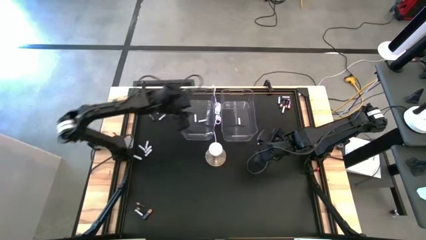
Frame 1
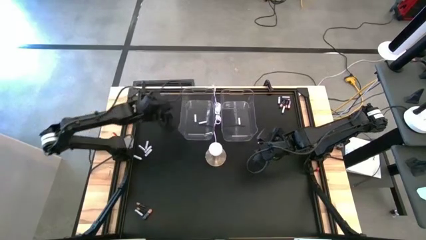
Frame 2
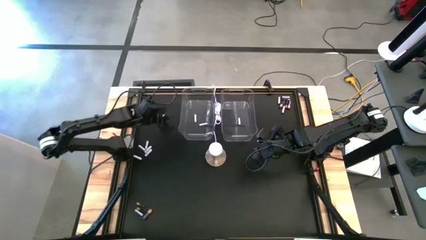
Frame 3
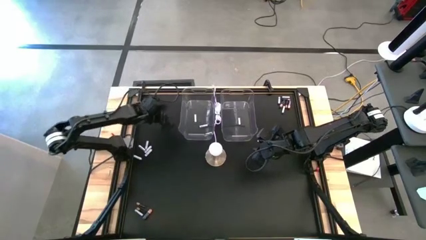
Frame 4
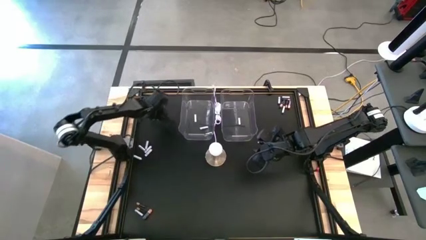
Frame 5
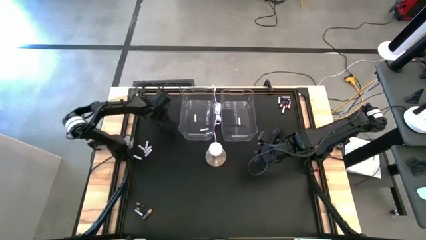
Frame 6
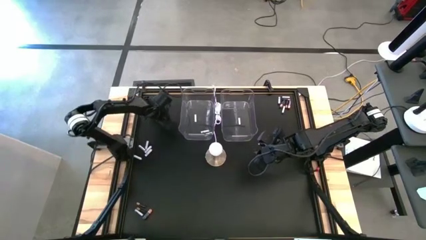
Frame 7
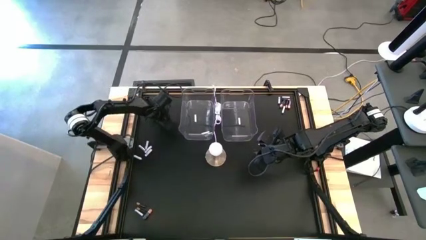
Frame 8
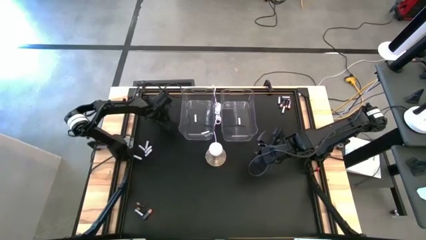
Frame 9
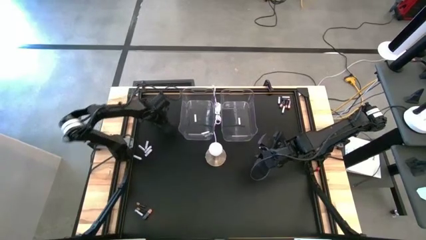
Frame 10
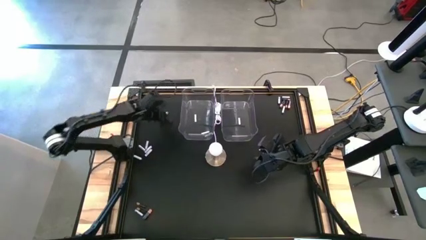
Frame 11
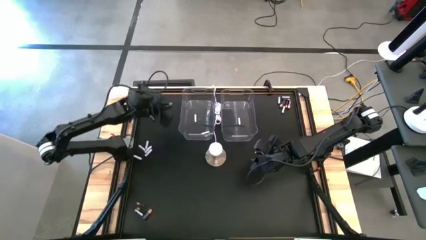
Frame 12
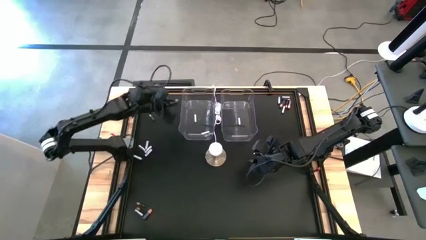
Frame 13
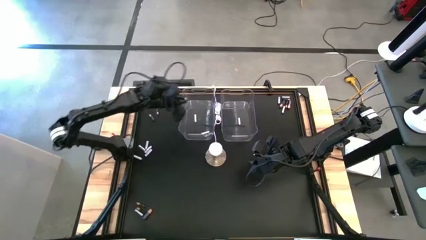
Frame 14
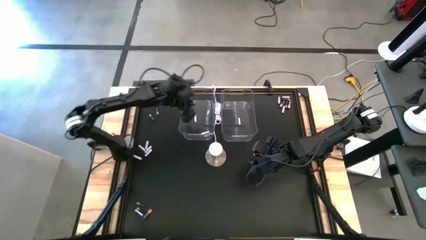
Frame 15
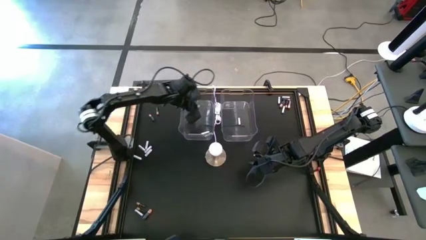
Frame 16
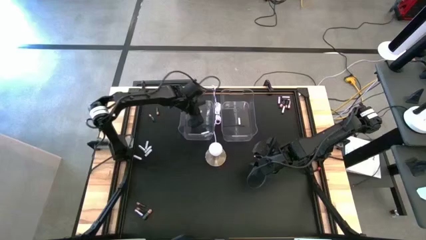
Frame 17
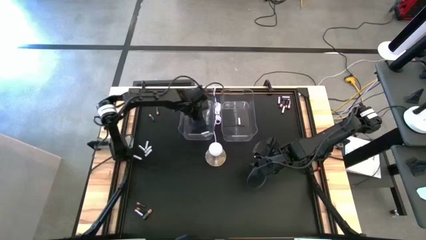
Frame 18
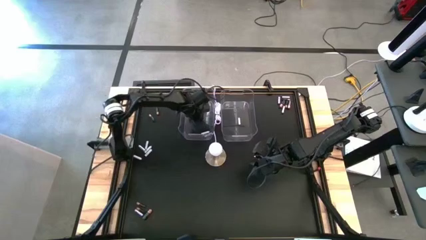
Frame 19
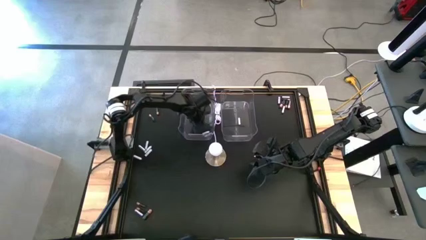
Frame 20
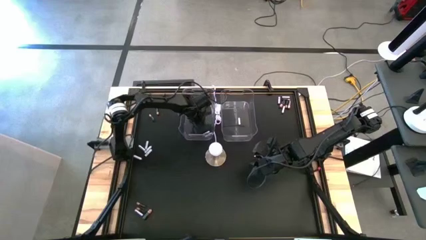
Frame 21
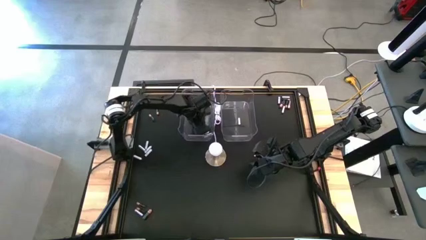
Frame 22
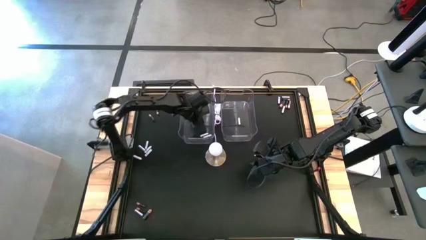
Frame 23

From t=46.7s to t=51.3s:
Task: Sort batteries
Put the white battery into the left transparent bin

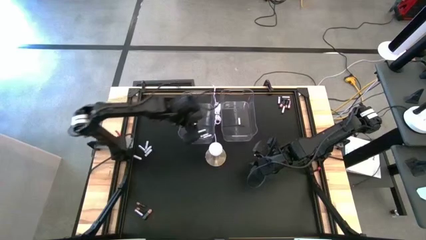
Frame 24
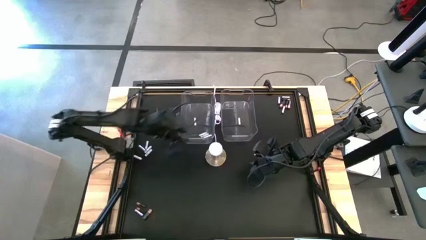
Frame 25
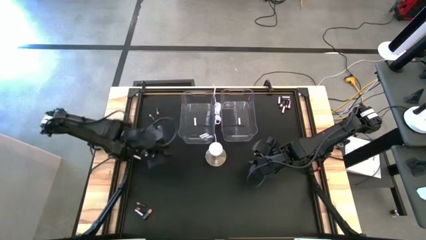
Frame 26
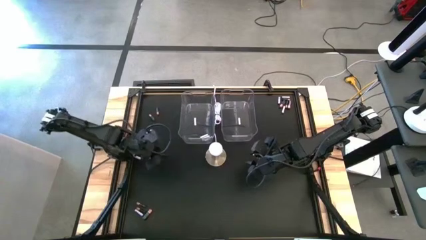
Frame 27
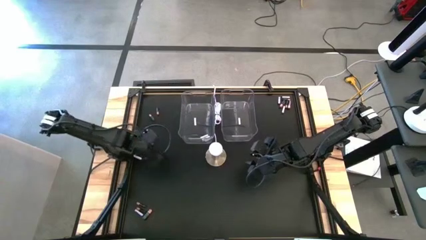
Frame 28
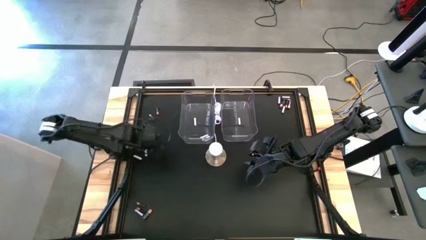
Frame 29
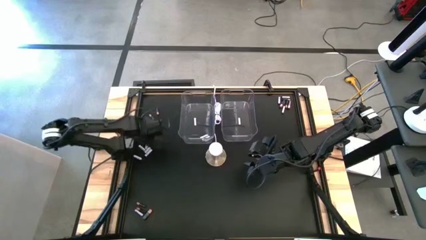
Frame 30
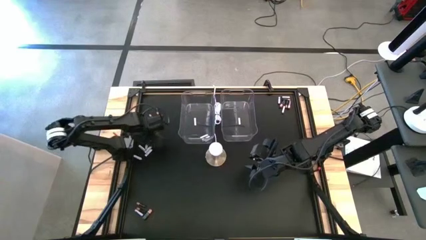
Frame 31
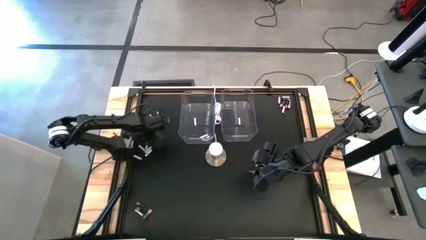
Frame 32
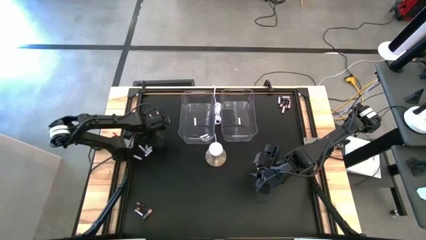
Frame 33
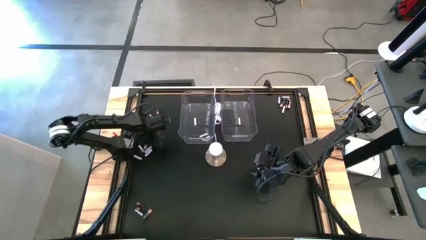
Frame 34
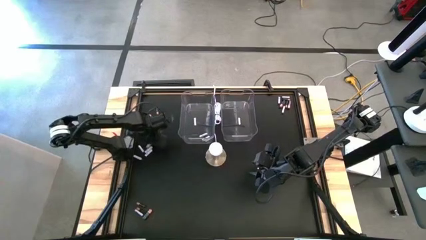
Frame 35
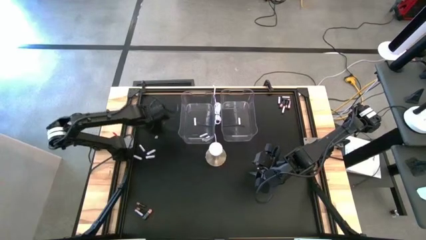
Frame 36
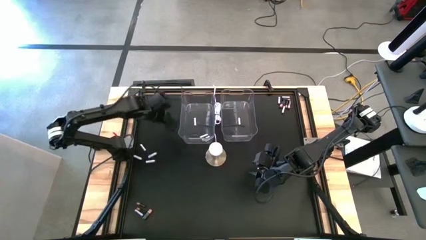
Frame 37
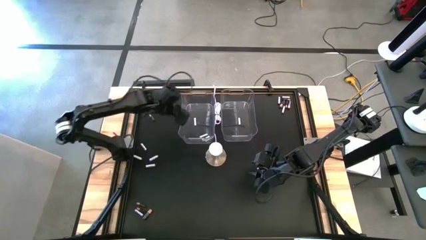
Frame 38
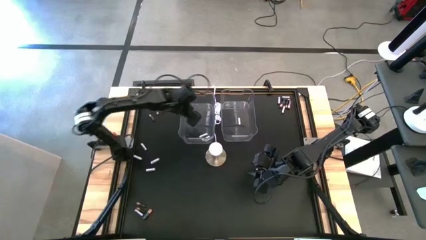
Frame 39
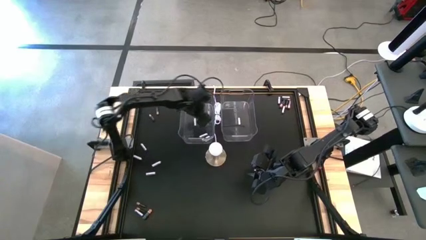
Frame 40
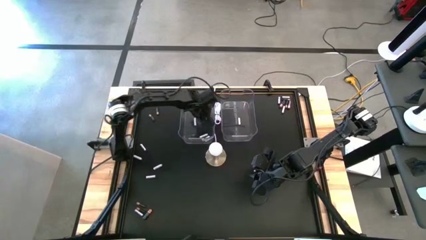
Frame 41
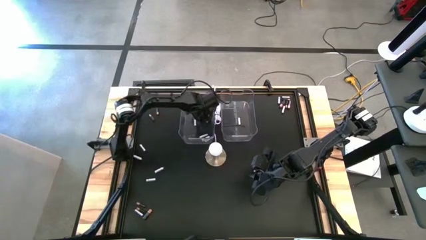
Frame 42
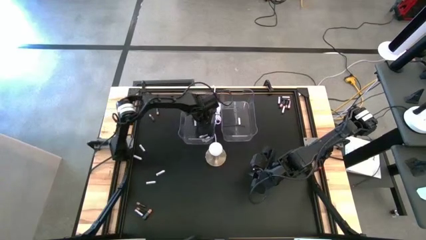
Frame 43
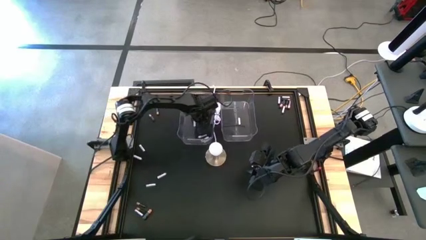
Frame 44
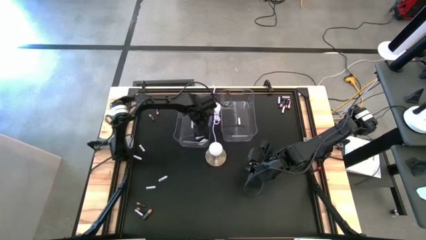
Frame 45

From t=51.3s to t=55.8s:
Put the white battery into the left transparent bin

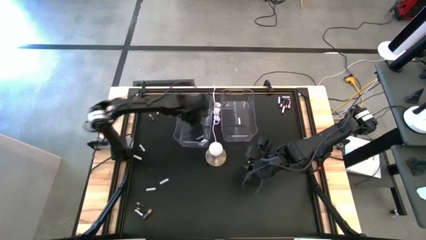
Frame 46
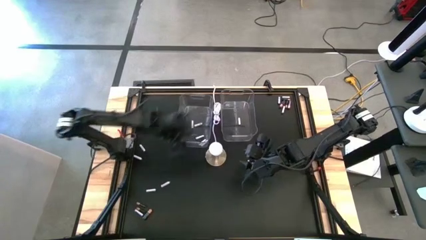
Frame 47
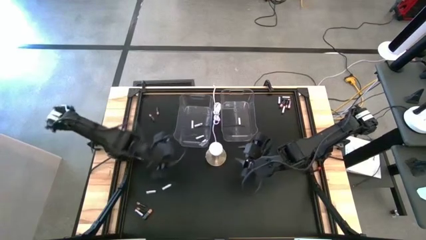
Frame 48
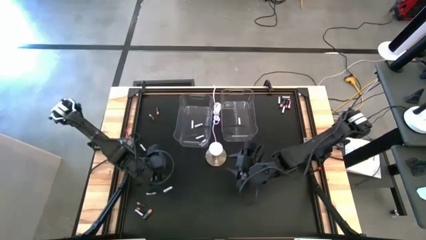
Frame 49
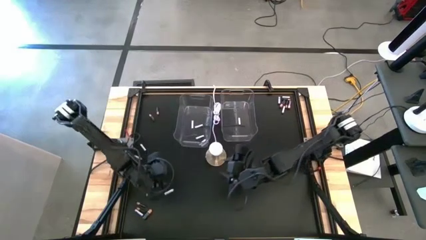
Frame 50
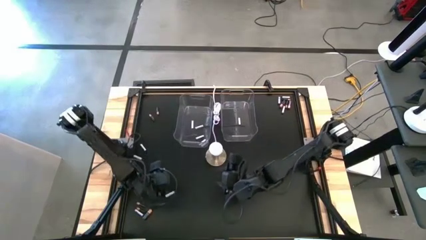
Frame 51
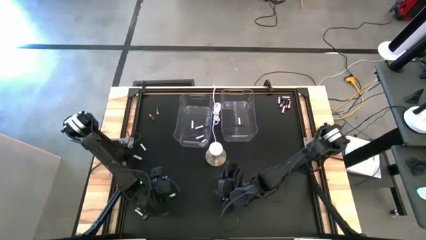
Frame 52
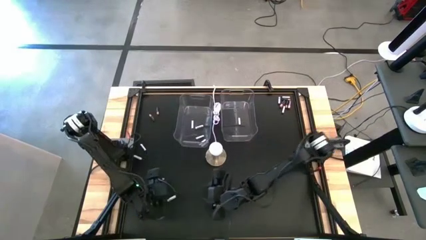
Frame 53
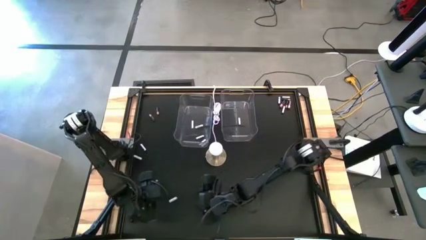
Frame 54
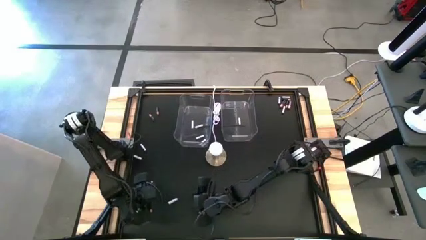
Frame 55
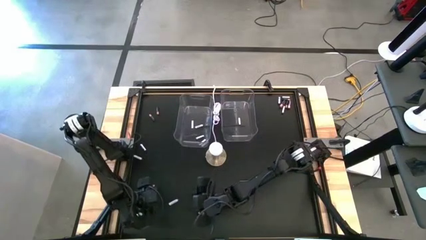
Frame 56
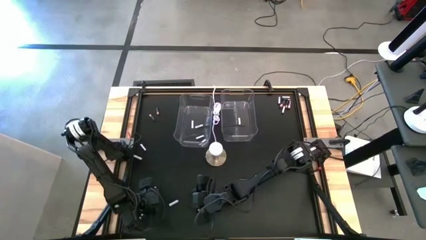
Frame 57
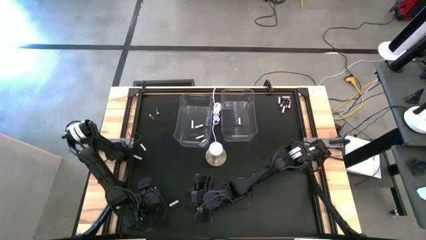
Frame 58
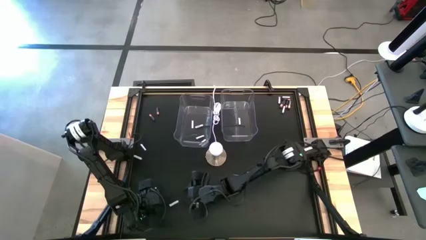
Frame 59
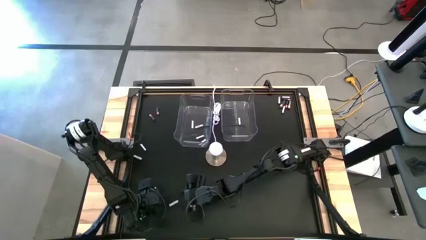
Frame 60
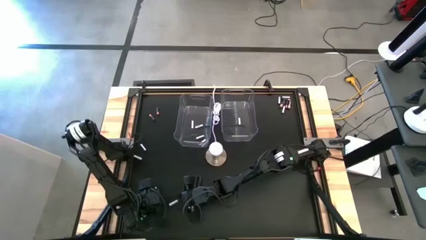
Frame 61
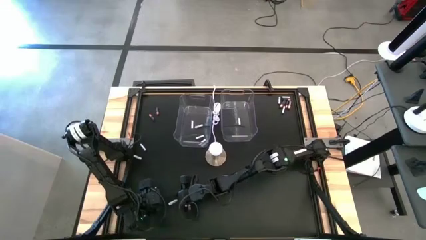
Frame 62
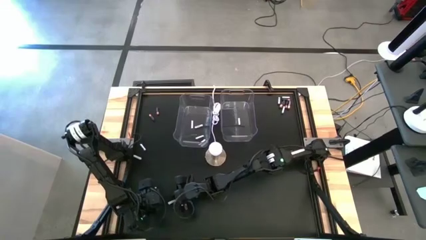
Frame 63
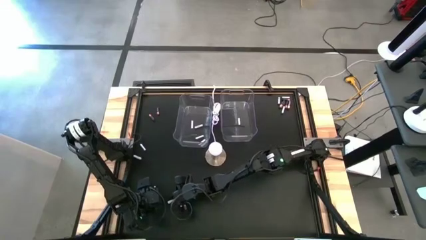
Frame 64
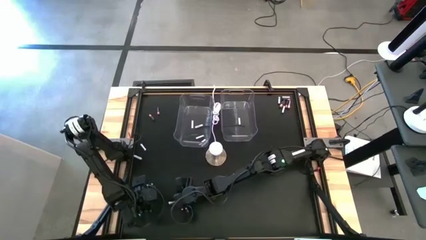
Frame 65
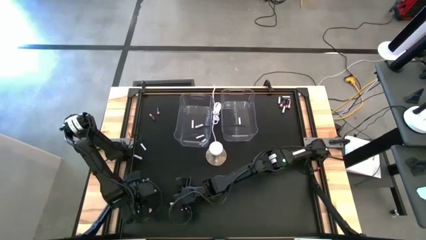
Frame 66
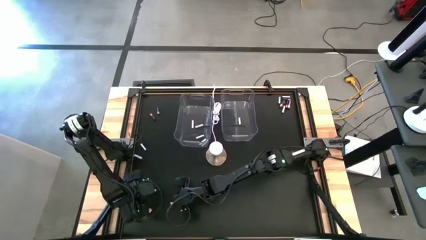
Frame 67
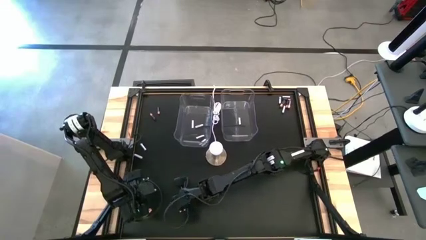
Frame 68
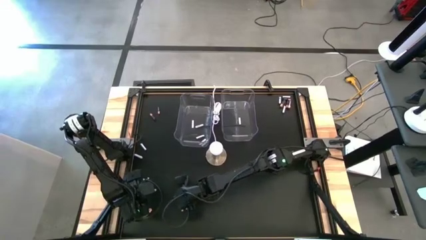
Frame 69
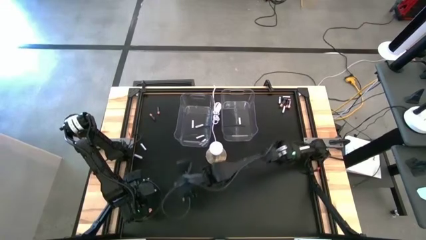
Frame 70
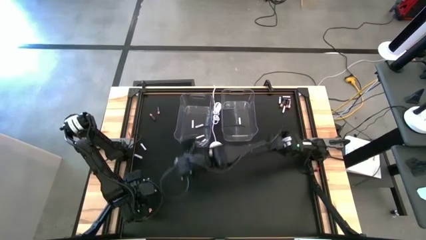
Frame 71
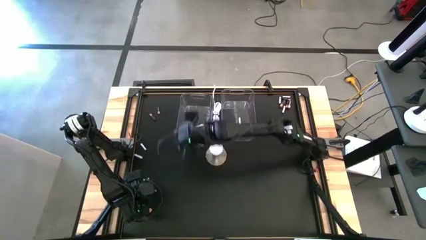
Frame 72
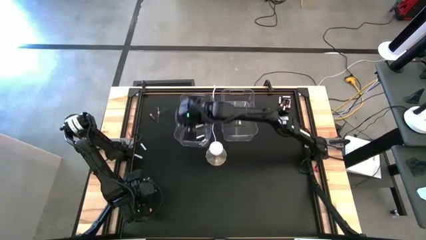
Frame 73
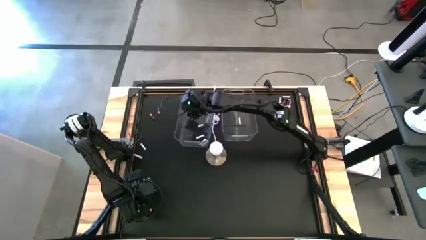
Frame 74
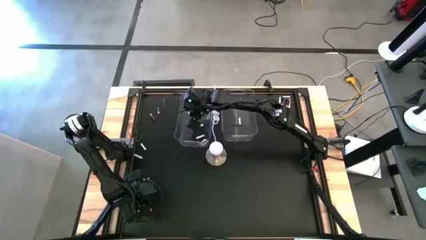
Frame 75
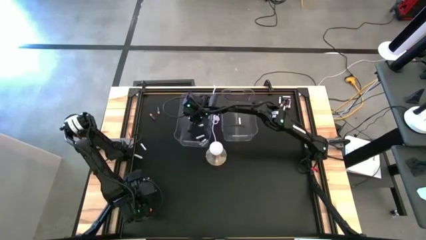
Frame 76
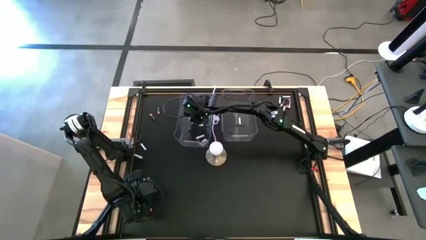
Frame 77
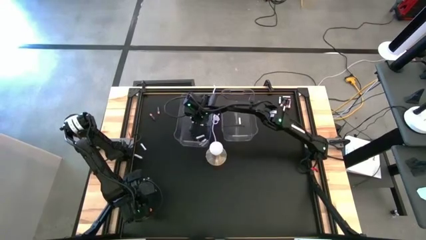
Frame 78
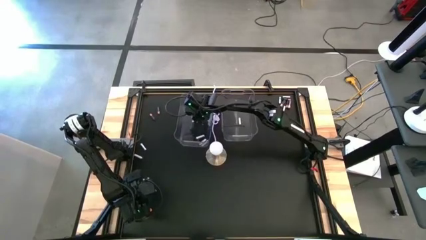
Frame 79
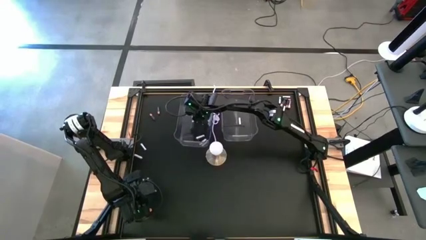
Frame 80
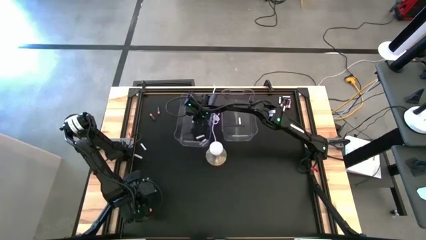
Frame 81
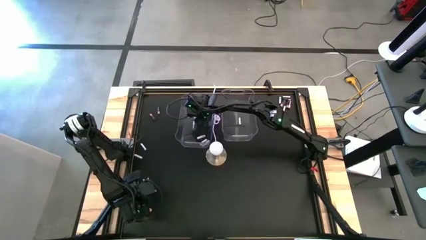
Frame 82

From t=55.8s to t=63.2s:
Put the white battery into the left transparent bin

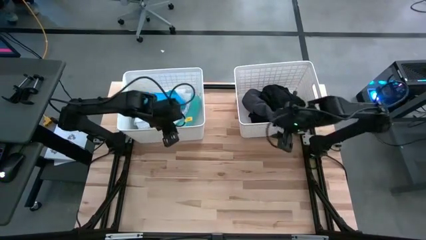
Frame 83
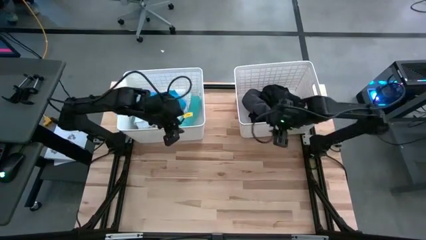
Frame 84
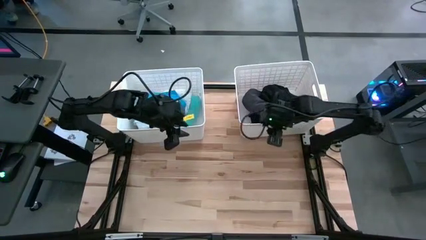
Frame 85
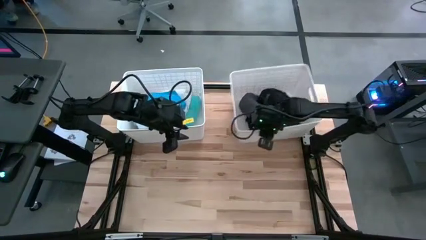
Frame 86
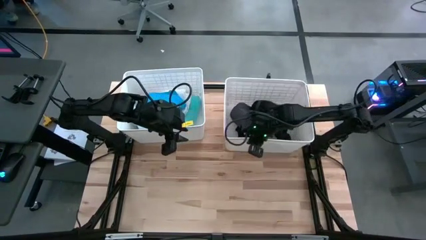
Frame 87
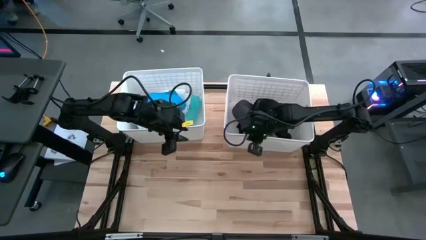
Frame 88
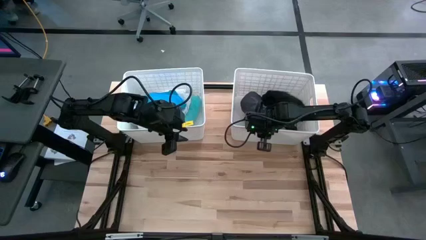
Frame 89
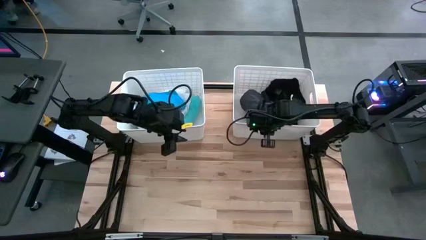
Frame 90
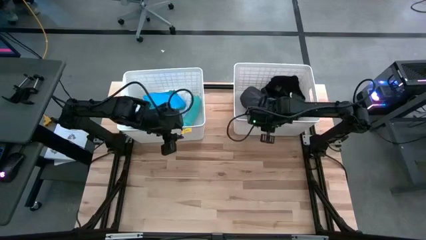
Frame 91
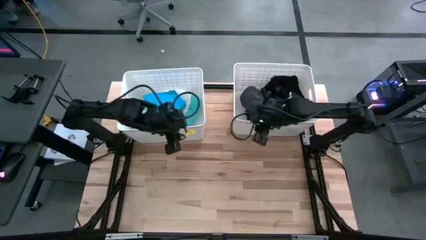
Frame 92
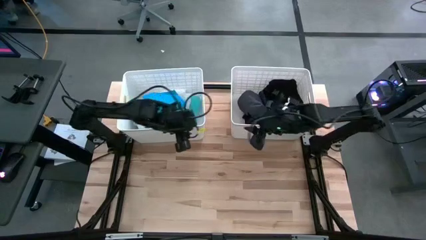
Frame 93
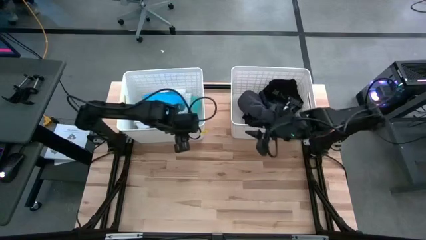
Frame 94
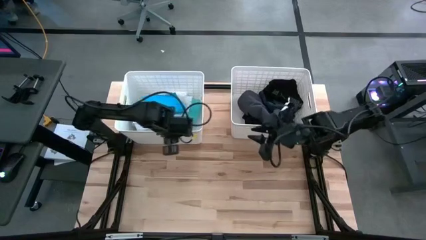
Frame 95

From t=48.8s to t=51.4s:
Task: Sort clothes
Move the right white bin to the upper right
